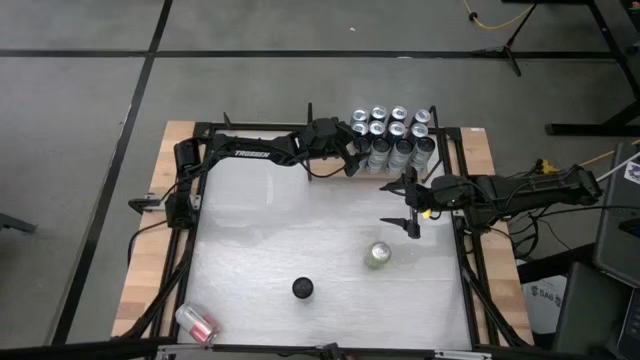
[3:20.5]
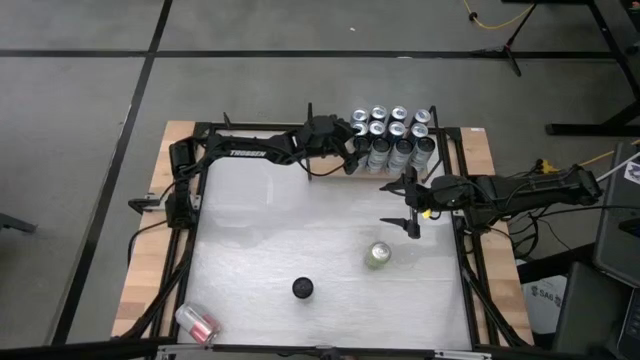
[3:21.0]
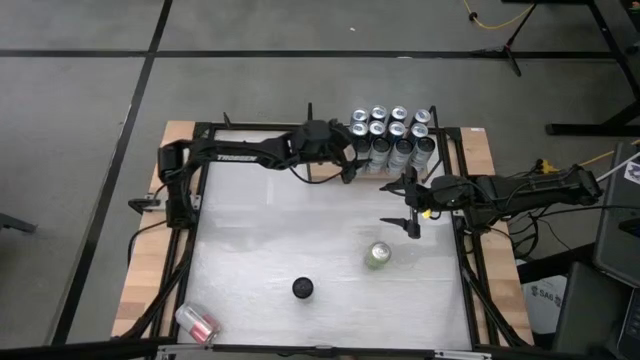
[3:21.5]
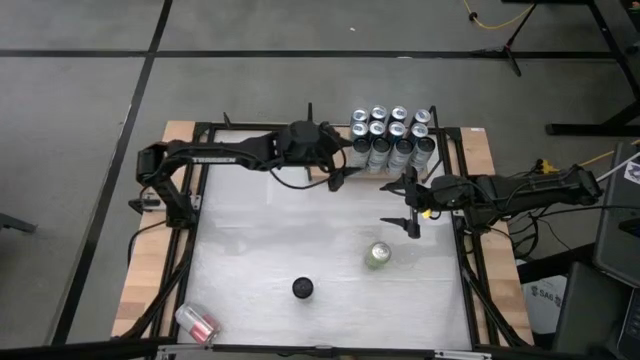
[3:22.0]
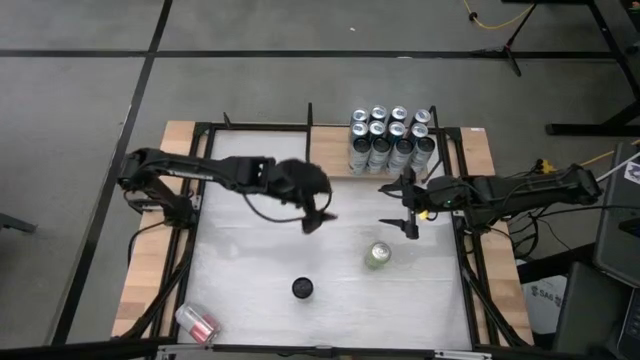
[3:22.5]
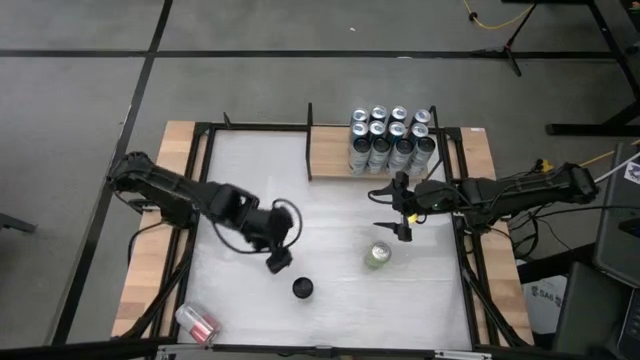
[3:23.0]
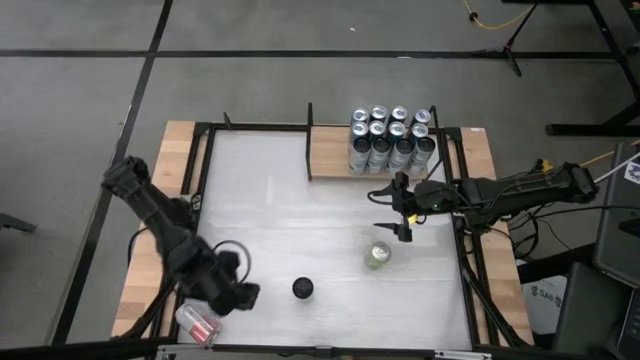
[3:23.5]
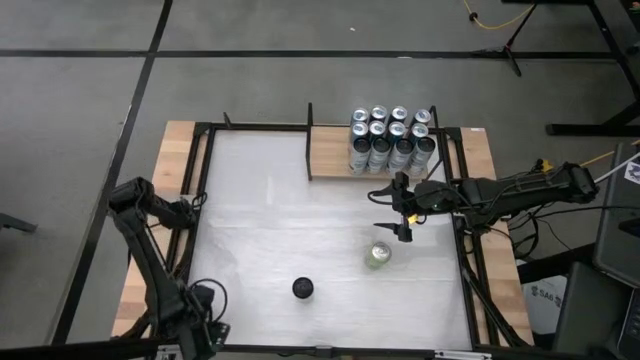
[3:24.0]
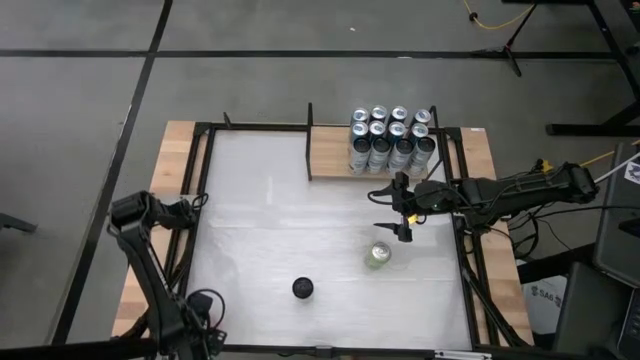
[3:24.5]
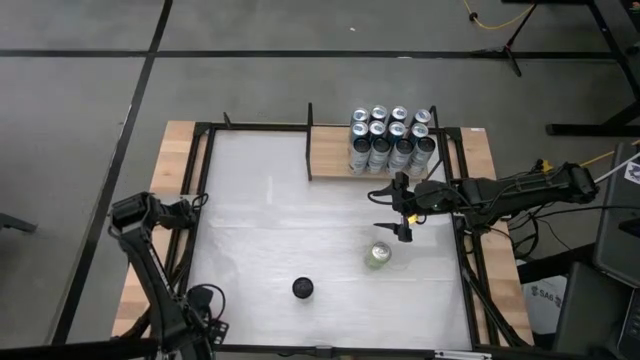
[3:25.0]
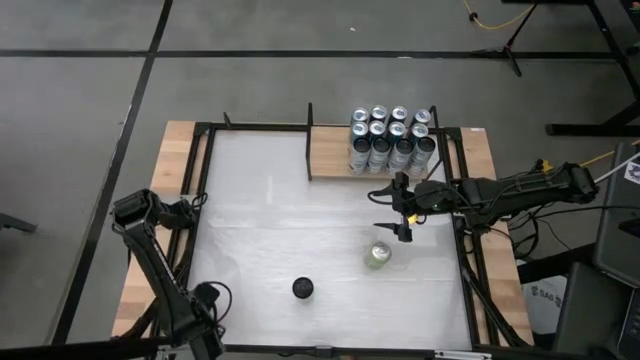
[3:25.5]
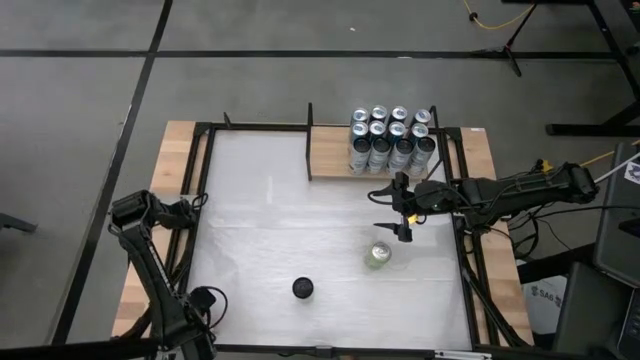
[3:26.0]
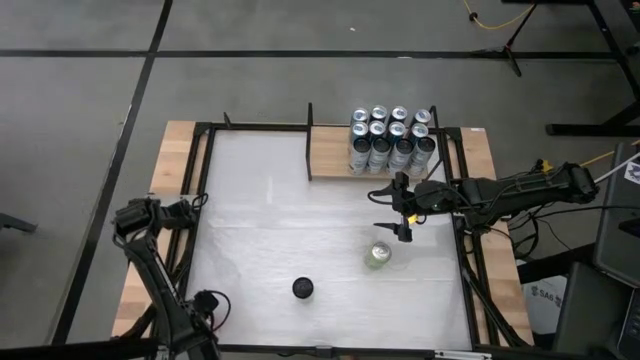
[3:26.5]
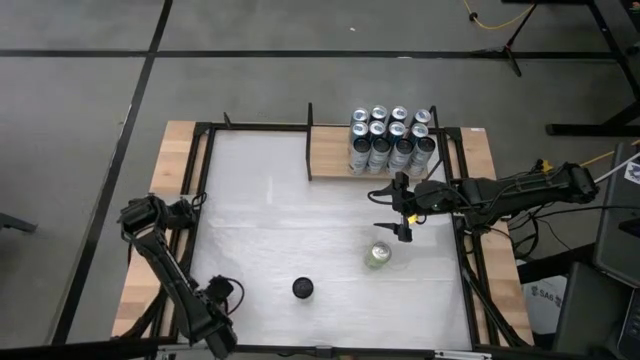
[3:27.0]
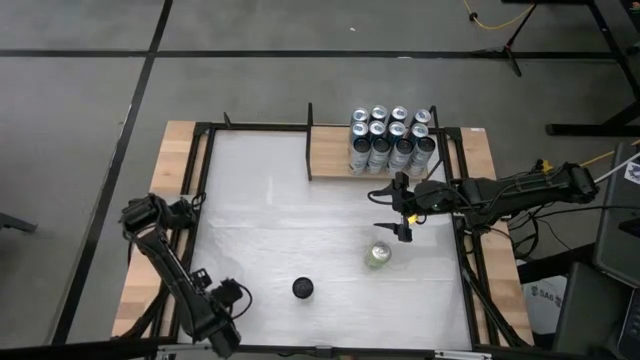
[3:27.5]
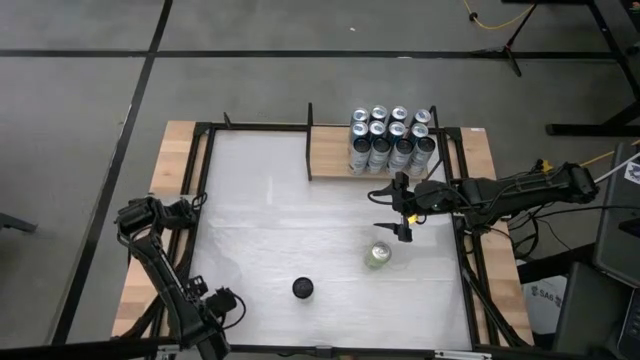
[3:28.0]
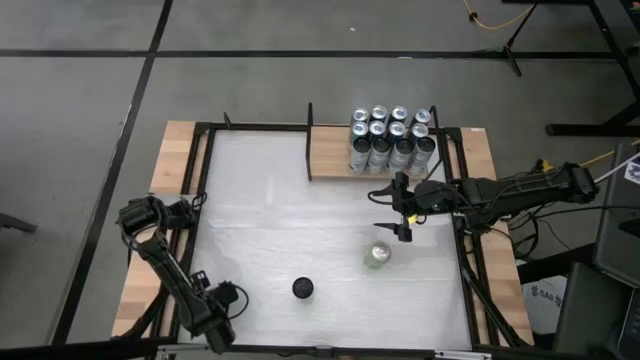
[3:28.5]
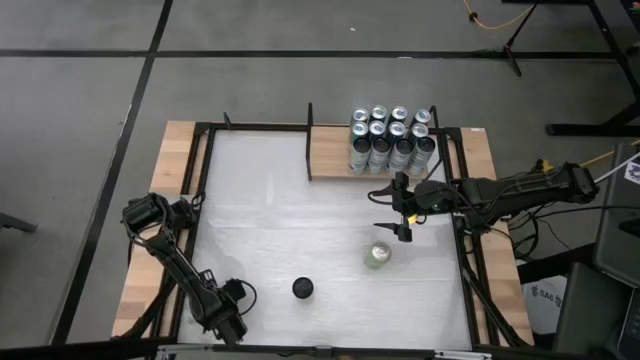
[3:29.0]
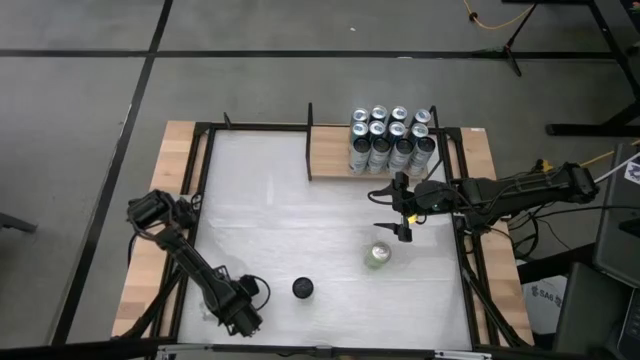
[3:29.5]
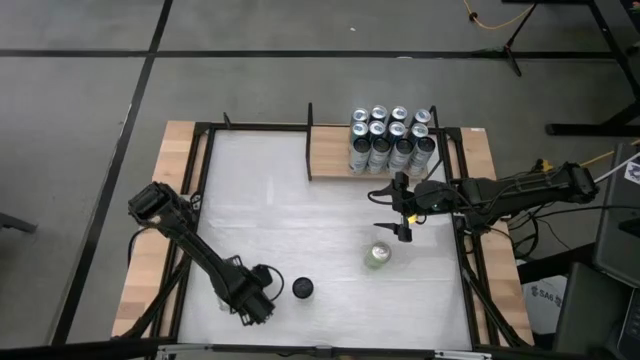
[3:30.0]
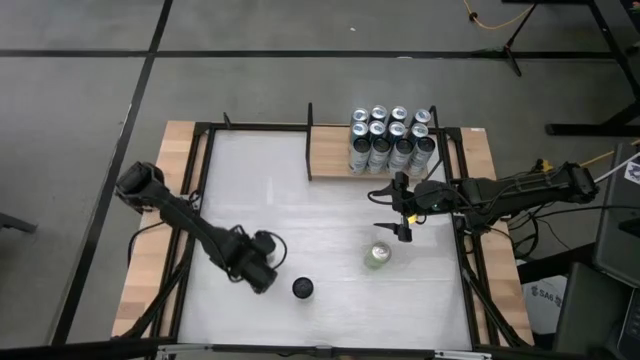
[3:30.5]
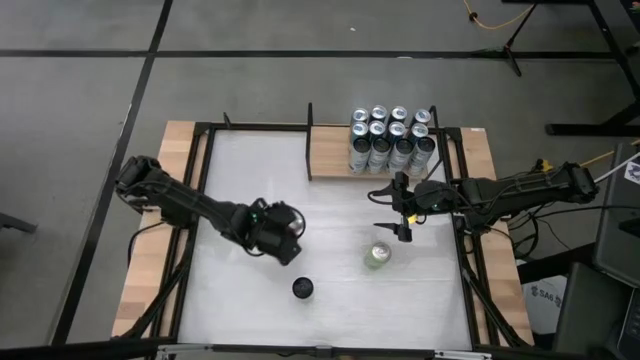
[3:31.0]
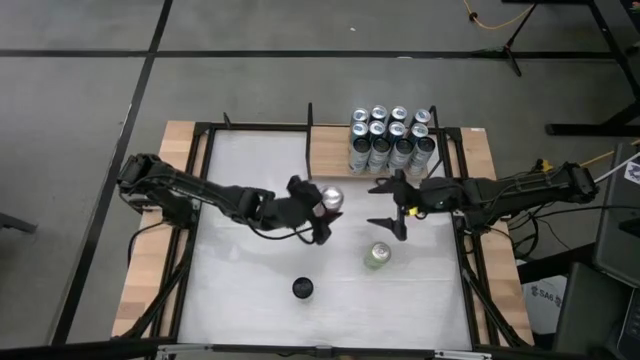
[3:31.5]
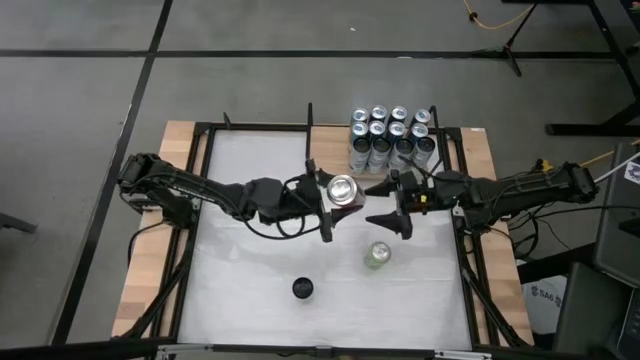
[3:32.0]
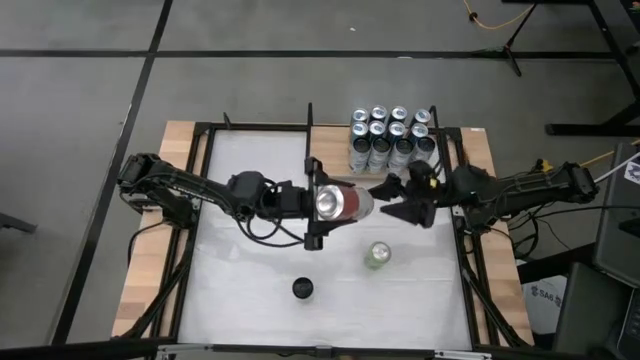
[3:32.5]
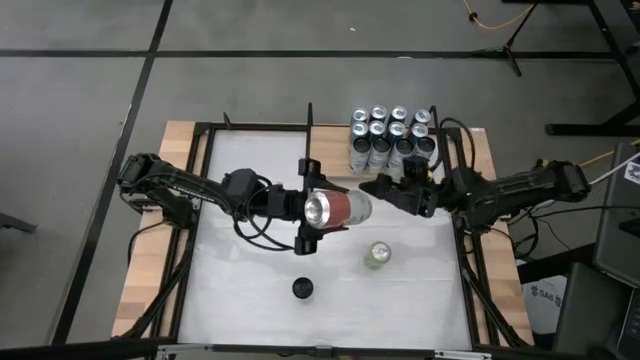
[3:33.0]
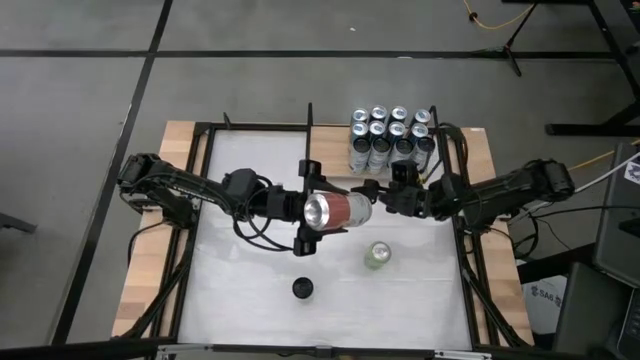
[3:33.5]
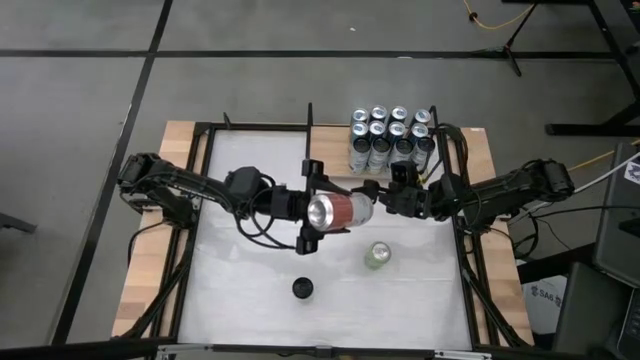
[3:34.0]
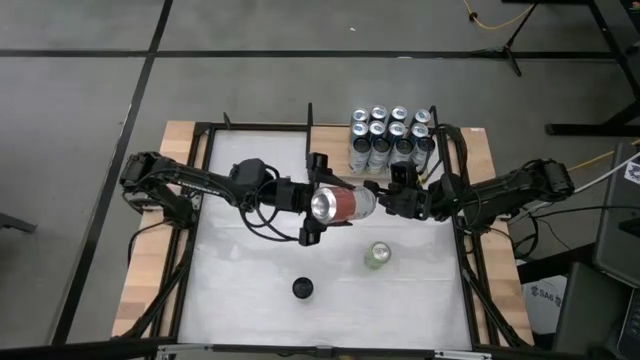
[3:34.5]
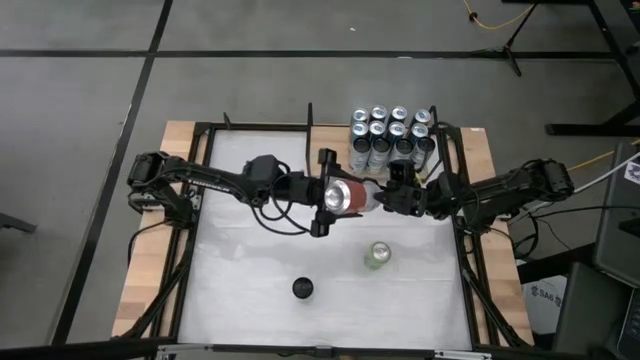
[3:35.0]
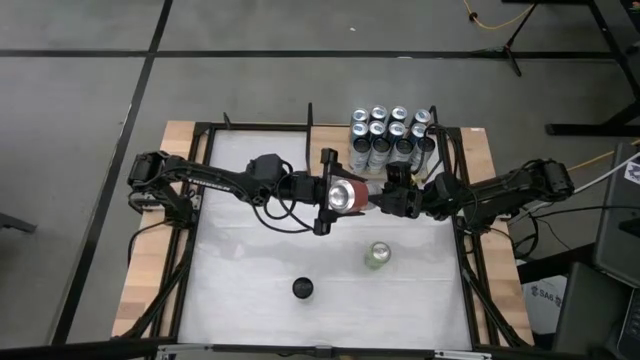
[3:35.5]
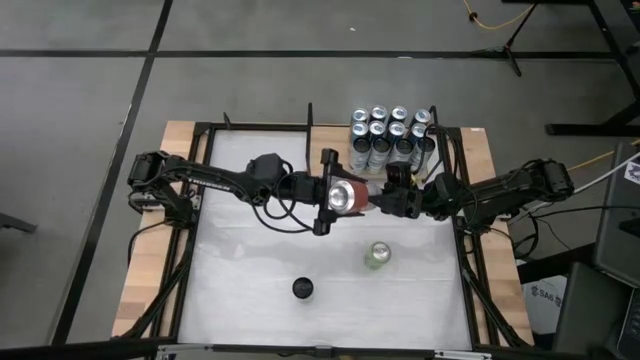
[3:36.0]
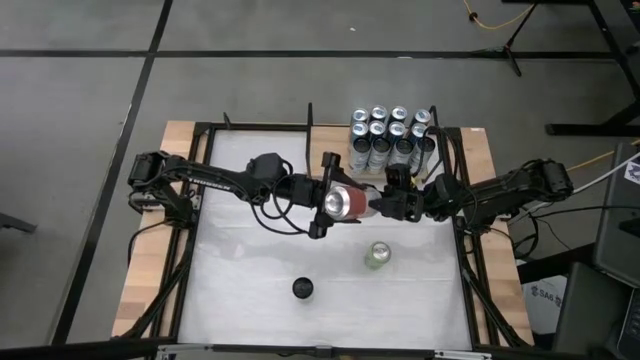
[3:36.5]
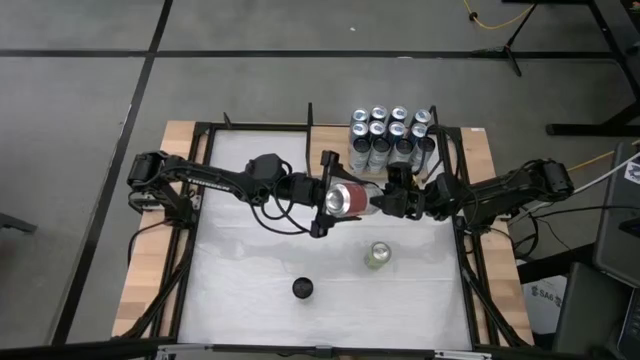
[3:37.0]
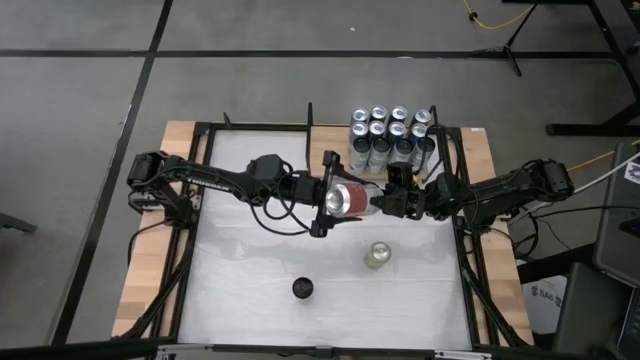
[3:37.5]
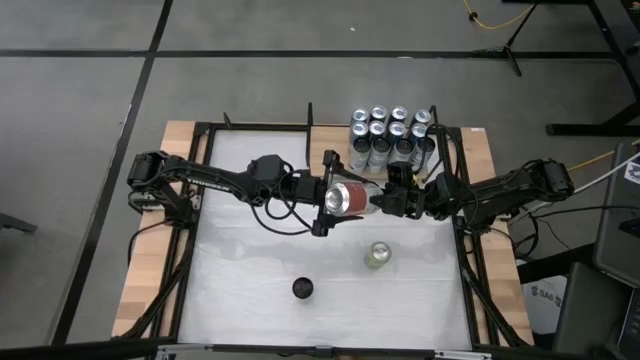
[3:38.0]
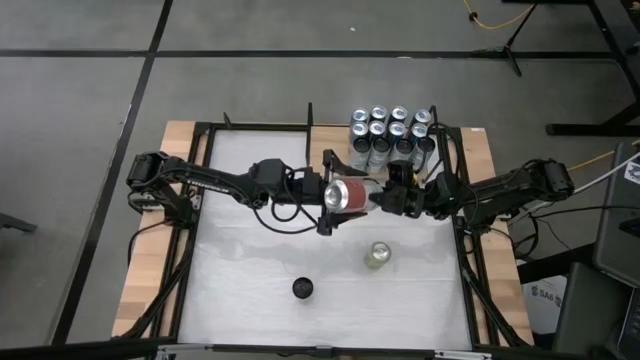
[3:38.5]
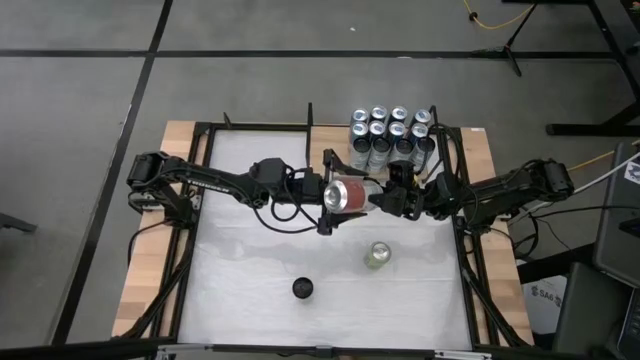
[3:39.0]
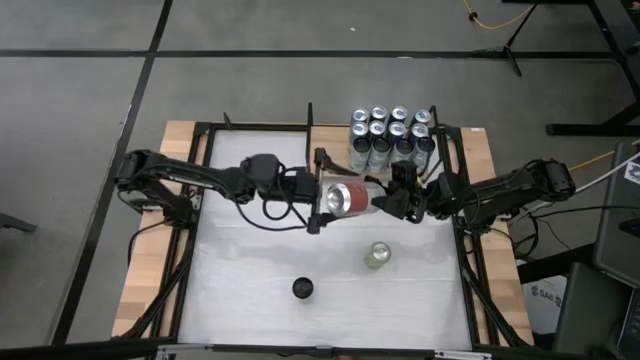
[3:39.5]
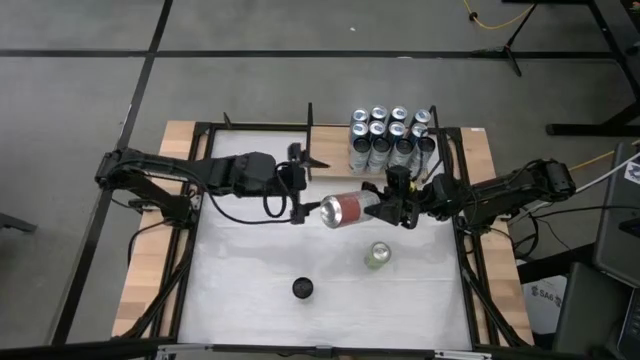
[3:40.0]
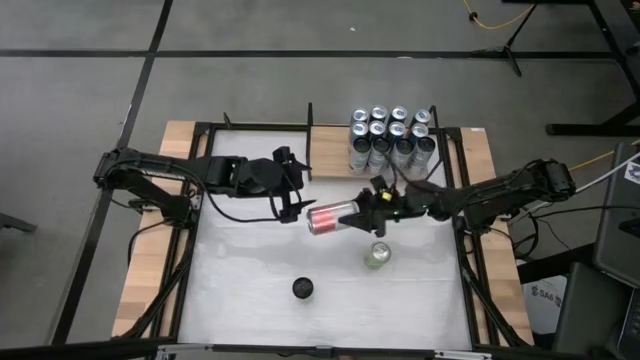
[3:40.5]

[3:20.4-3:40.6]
Task: Place canned beverage on shelf
Put the orange-white soda can on the shelf
